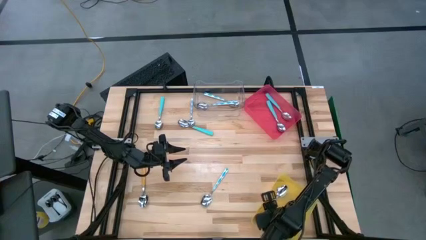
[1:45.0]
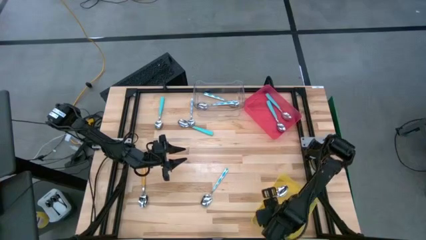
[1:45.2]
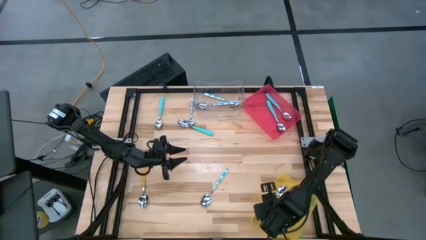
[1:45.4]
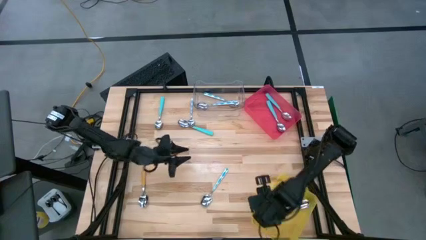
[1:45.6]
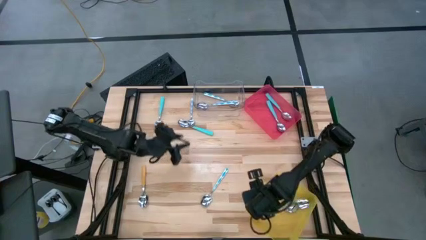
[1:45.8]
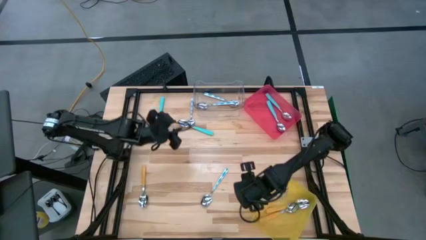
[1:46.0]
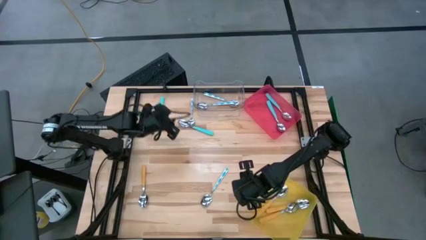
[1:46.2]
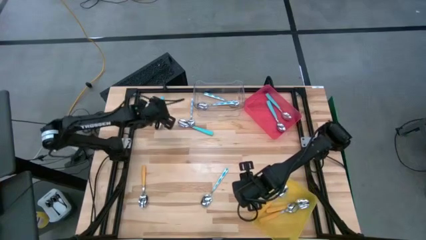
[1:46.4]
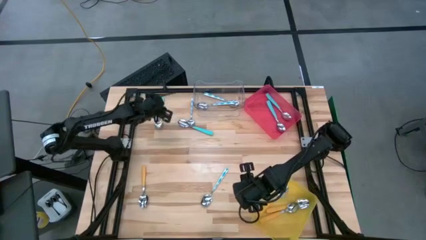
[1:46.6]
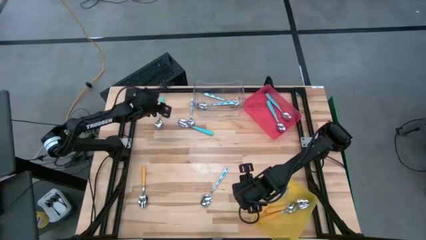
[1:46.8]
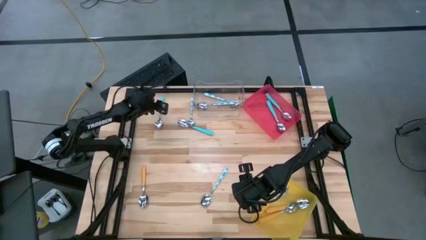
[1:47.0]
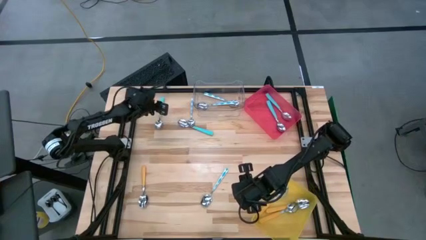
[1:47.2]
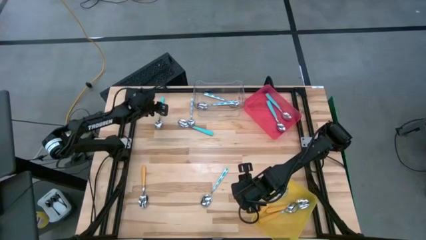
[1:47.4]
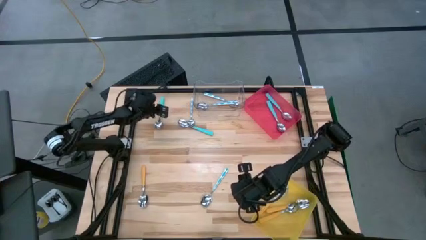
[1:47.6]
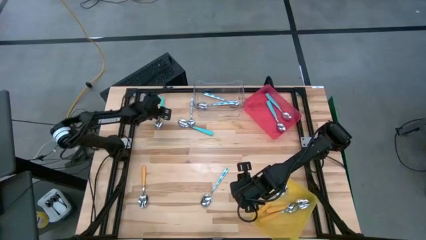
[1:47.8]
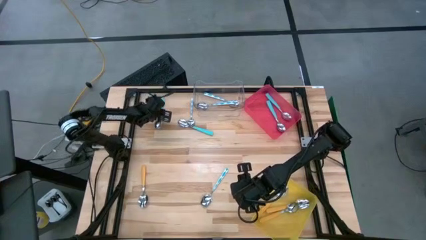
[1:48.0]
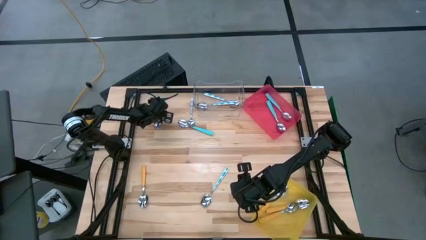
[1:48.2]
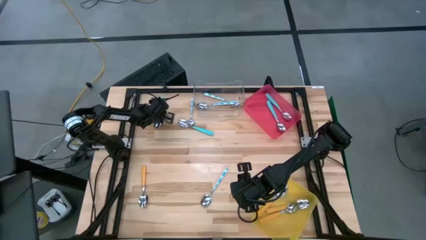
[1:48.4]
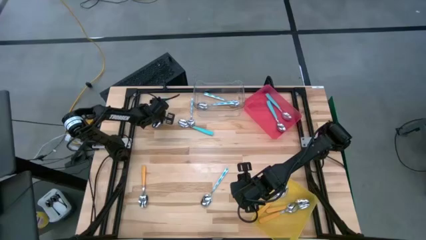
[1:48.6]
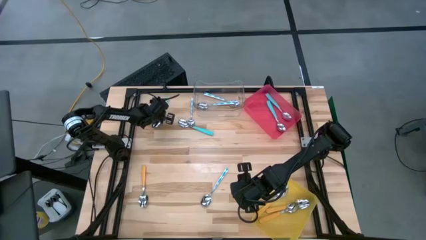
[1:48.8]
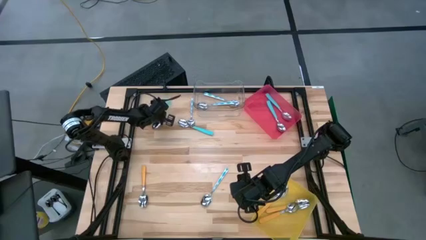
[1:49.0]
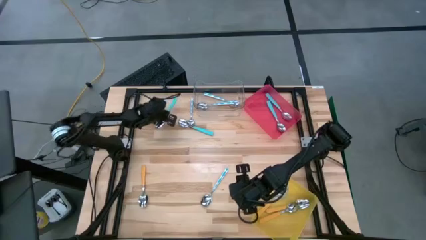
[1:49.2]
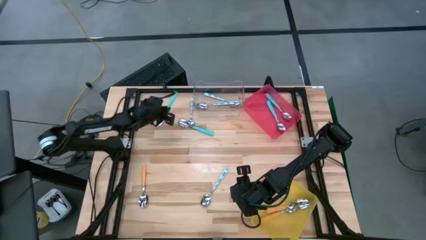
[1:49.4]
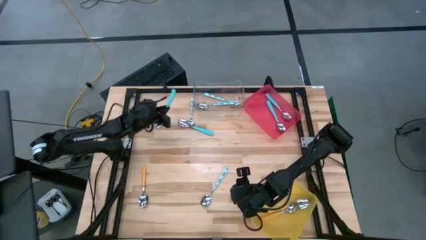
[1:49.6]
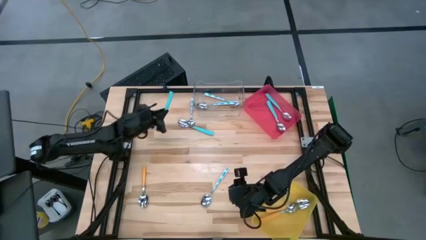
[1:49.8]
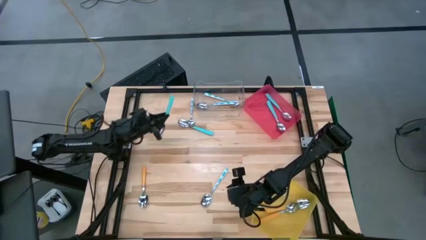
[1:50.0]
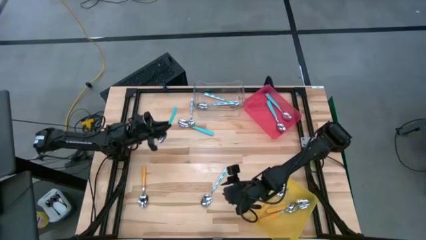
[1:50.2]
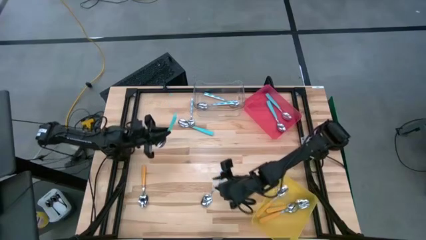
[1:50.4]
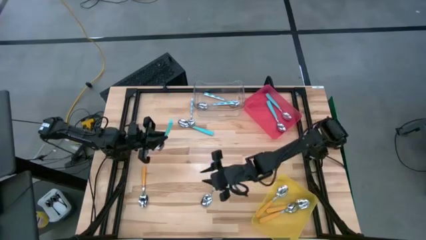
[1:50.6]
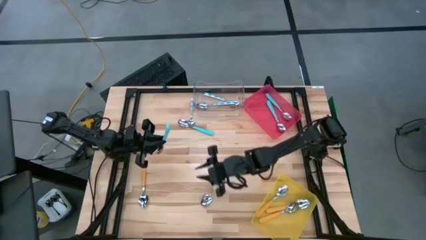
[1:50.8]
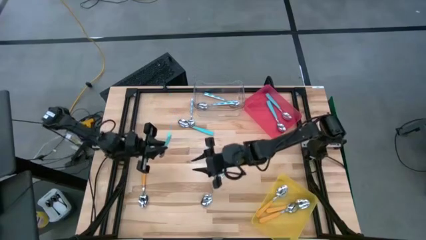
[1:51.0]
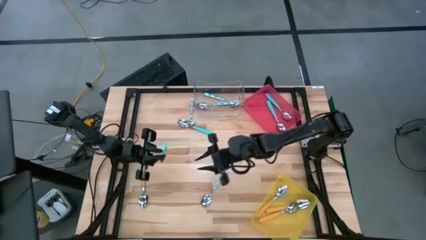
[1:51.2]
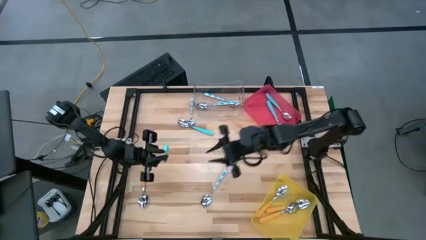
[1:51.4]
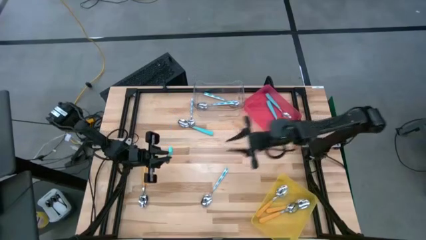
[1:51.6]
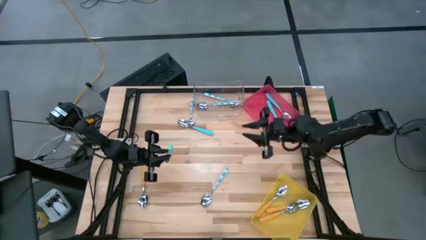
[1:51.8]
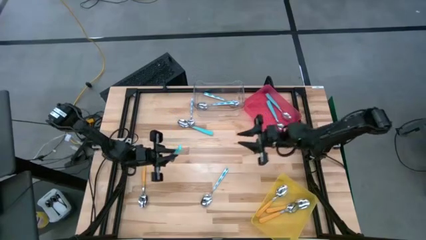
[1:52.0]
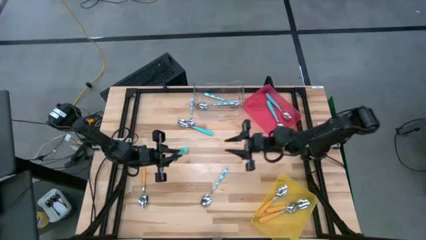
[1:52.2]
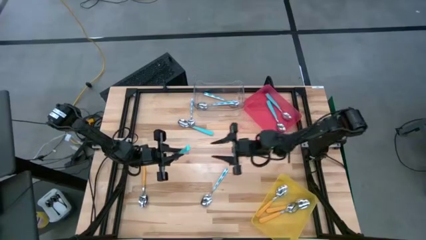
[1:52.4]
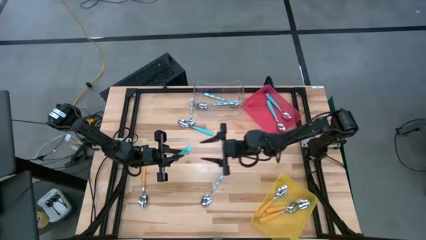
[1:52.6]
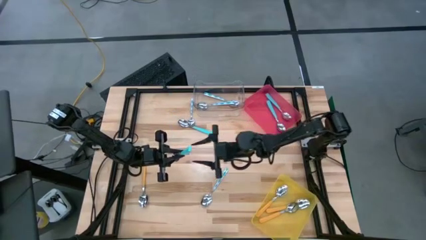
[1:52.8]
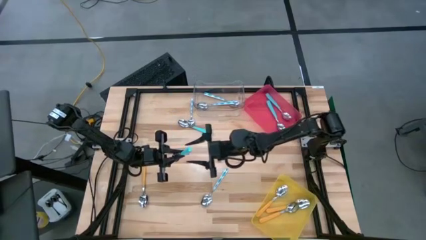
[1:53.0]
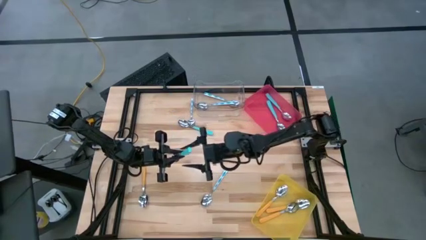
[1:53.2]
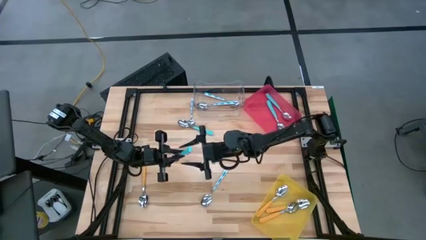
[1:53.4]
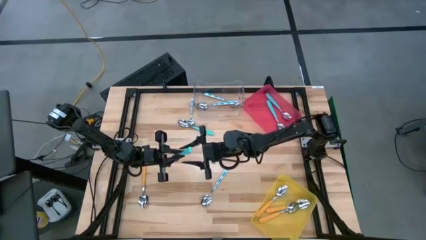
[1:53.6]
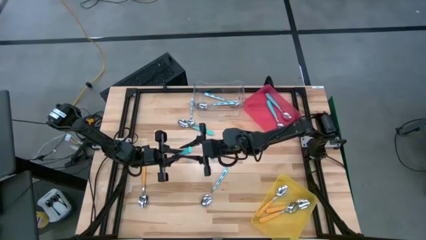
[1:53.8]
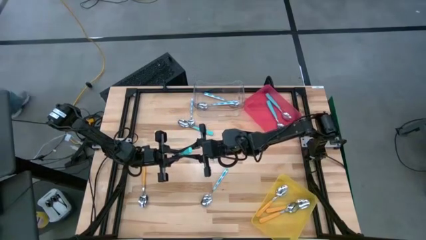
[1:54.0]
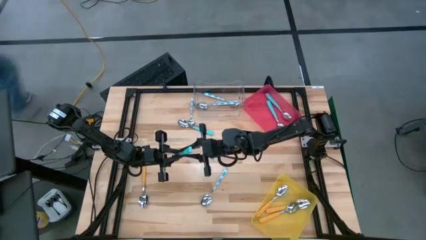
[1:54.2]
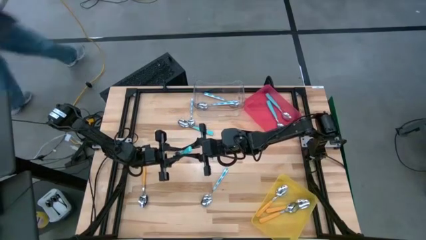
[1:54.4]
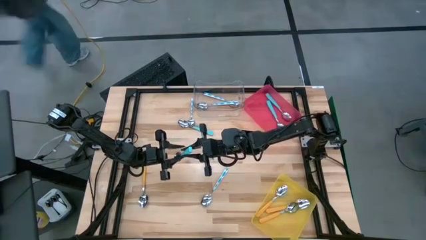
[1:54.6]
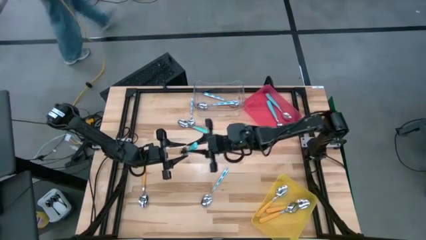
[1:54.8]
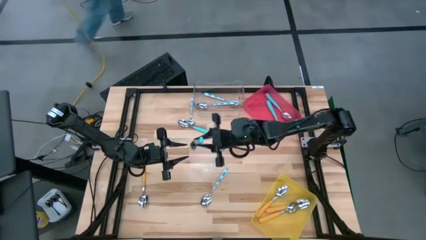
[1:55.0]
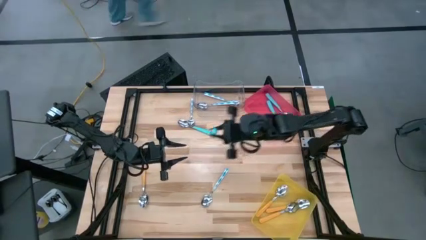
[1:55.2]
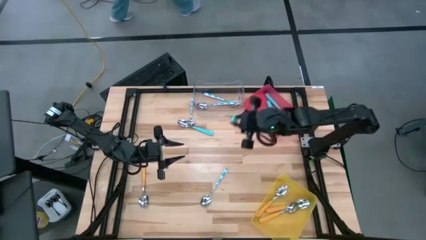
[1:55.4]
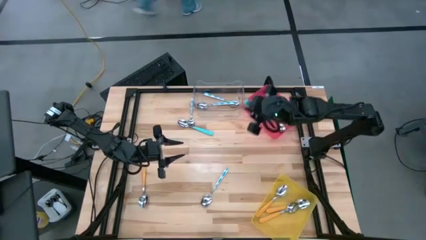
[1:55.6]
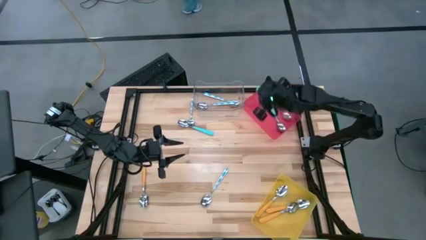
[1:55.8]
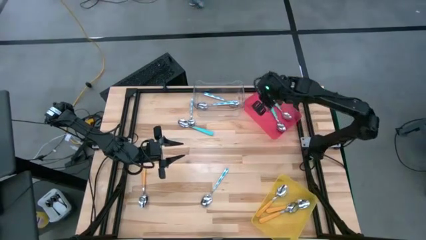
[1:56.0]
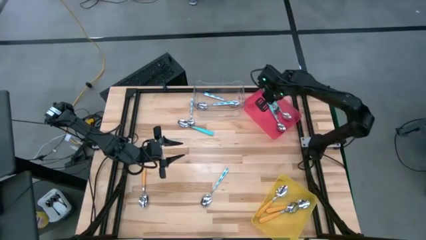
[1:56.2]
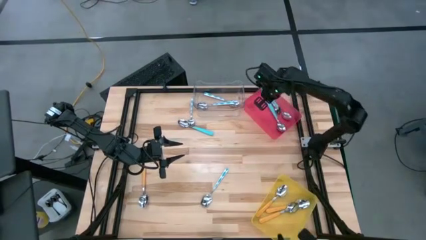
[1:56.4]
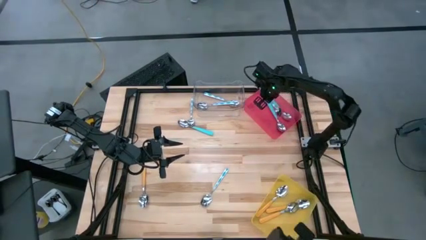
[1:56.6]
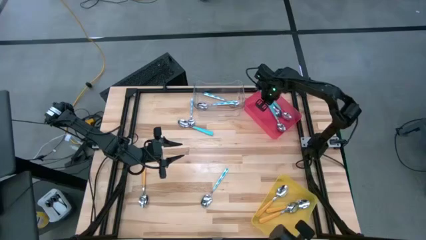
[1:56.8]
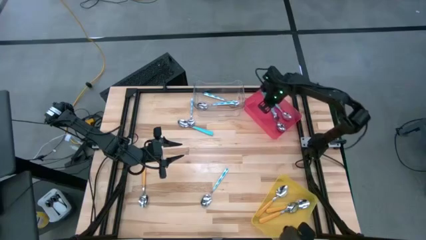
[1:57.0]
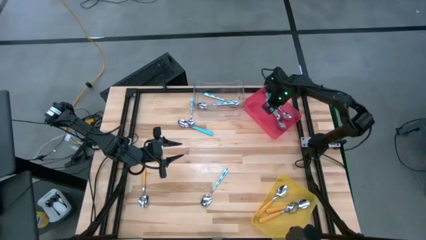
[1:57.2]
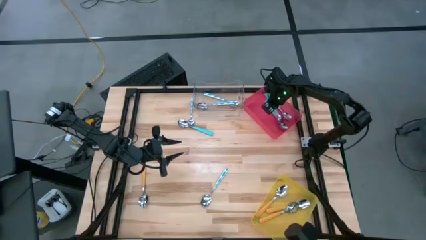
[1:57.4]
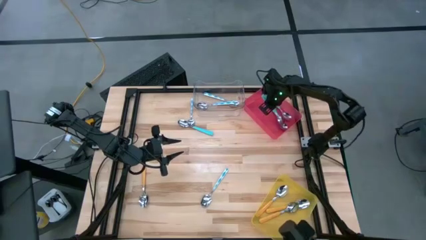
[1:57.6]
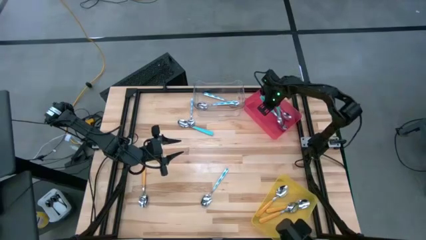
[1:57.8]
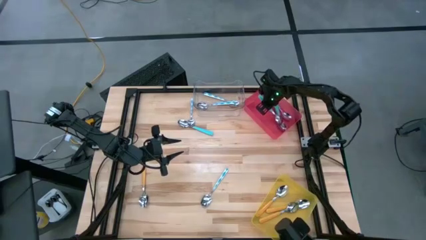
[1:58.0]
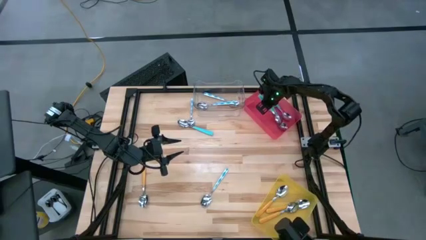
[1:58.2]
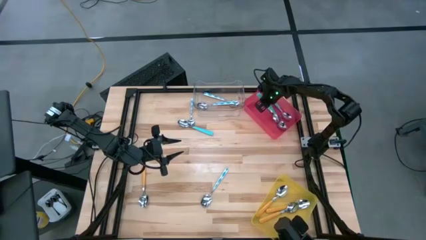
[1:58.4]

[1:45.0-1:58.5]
Task: Sort silverware by color (type)
Put the blue spoon into the red bin

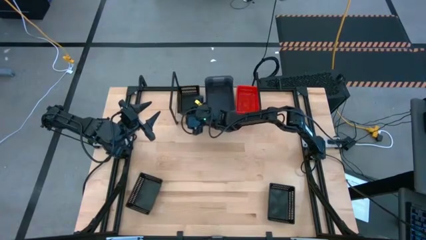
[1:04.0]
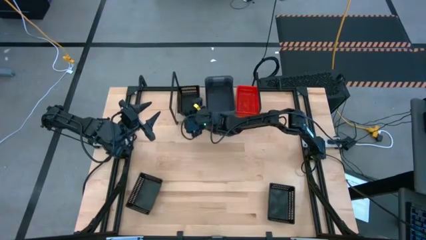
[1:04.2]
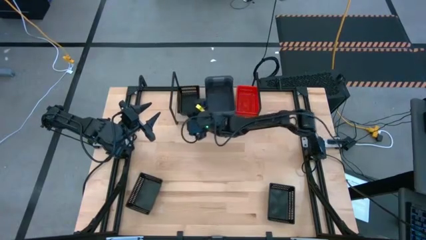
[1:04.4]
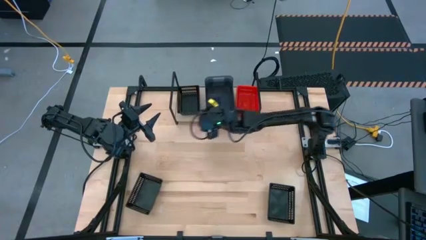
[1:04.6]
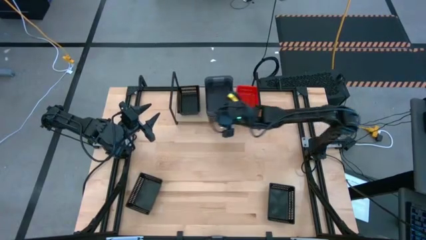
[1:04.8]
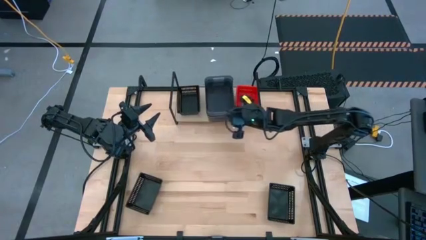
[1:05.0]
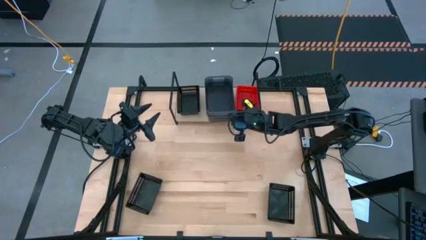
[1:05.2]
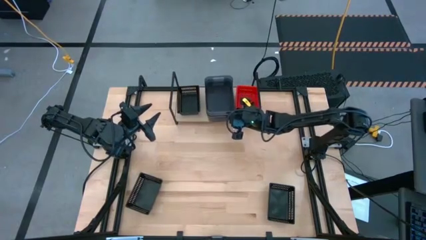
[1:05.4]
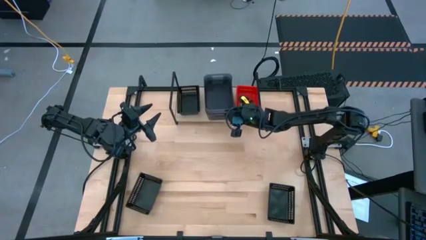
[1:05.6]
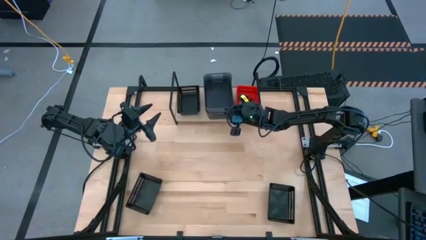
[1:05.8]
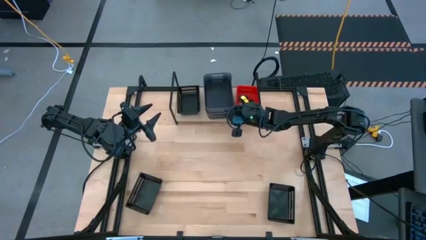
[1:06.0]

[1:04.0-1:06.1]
Task: Stack baskets on shelf by color
Adjust the light black bins on the shelf
